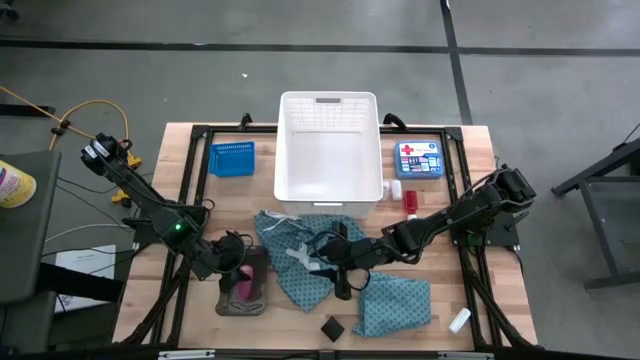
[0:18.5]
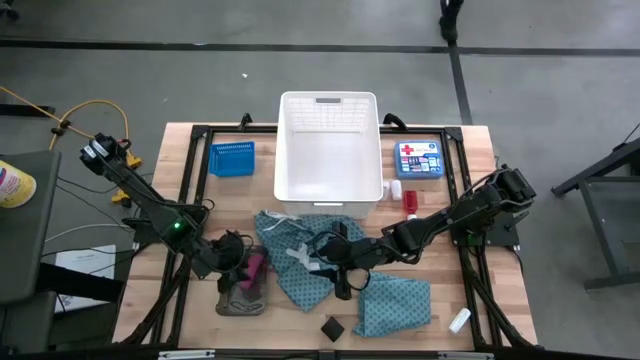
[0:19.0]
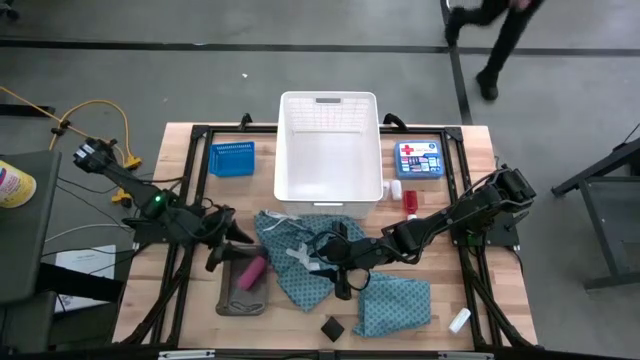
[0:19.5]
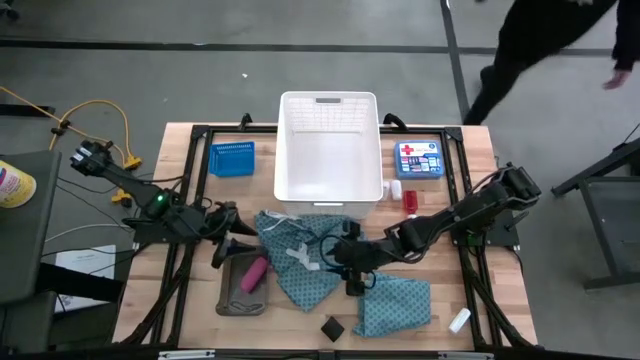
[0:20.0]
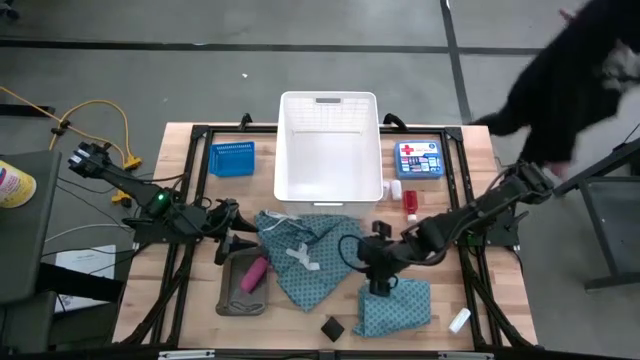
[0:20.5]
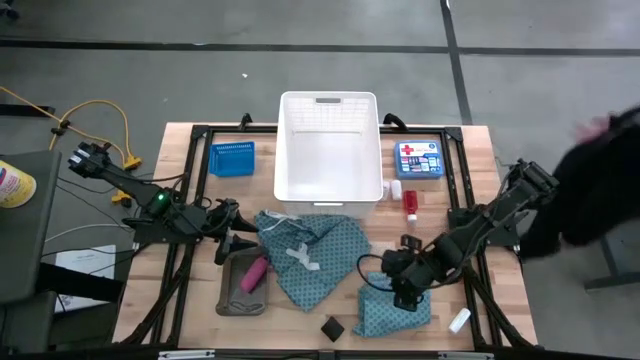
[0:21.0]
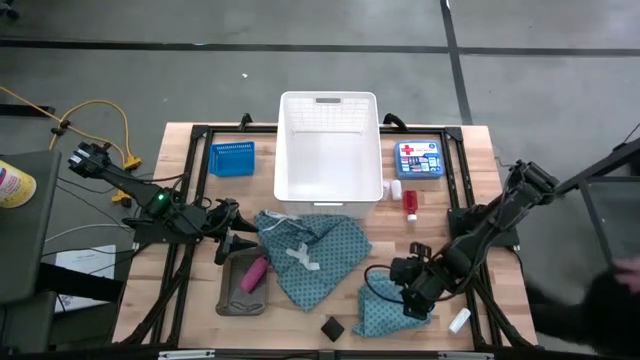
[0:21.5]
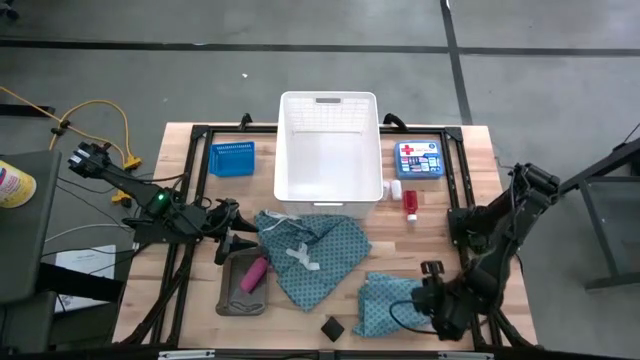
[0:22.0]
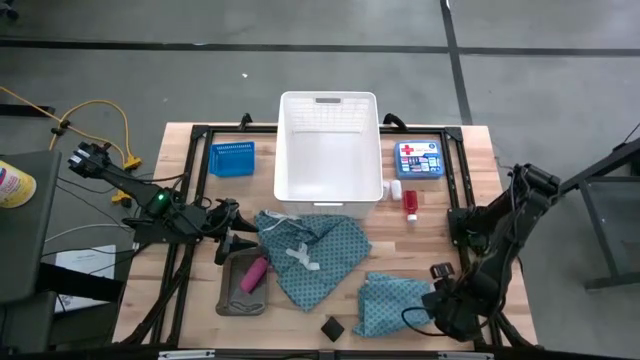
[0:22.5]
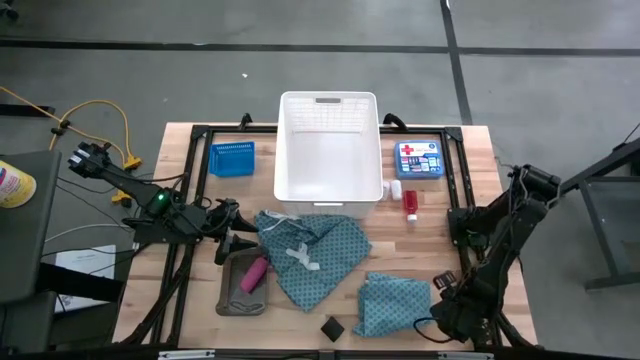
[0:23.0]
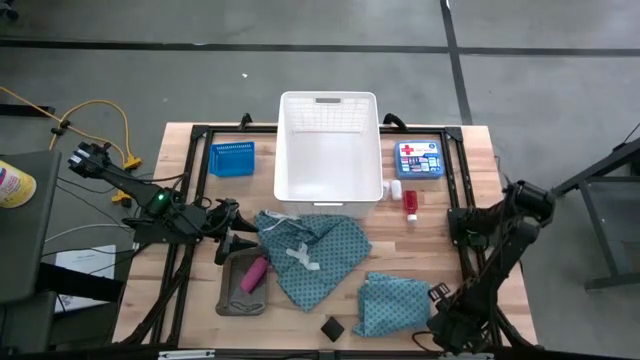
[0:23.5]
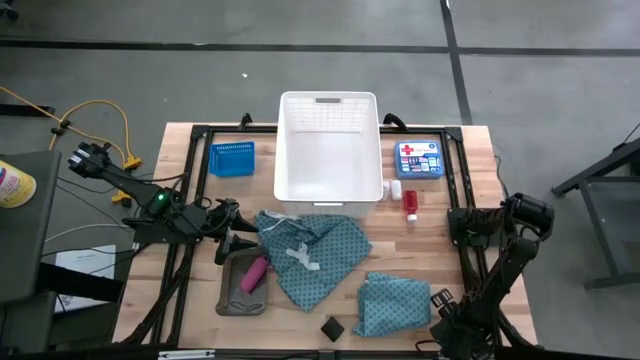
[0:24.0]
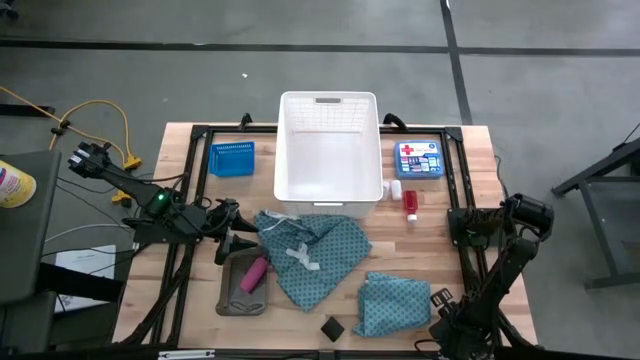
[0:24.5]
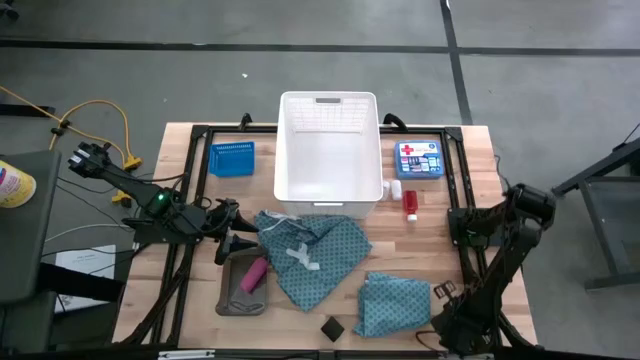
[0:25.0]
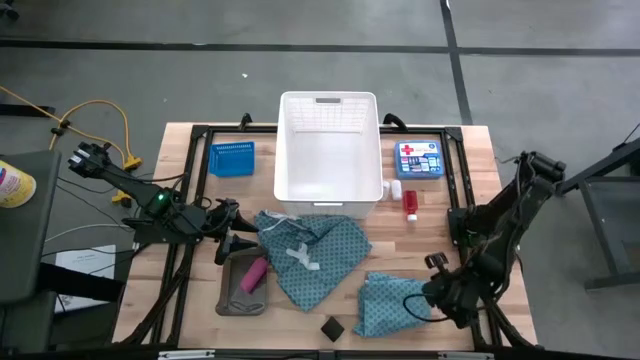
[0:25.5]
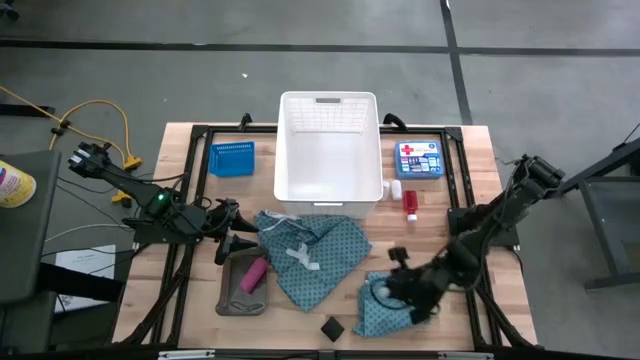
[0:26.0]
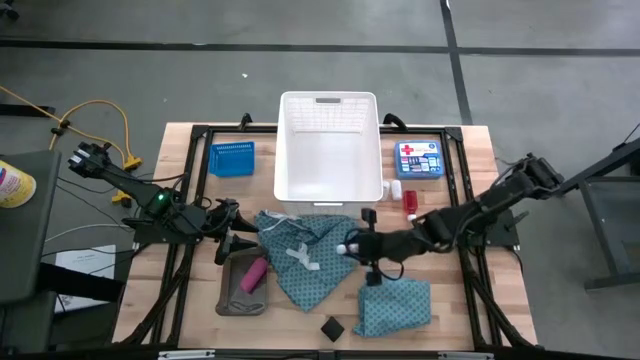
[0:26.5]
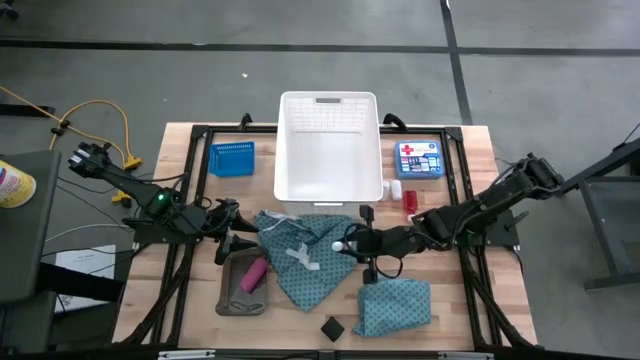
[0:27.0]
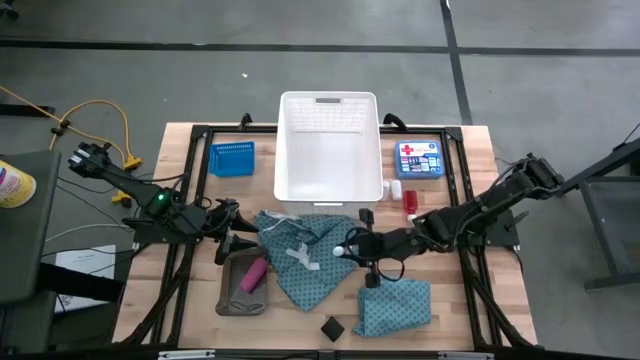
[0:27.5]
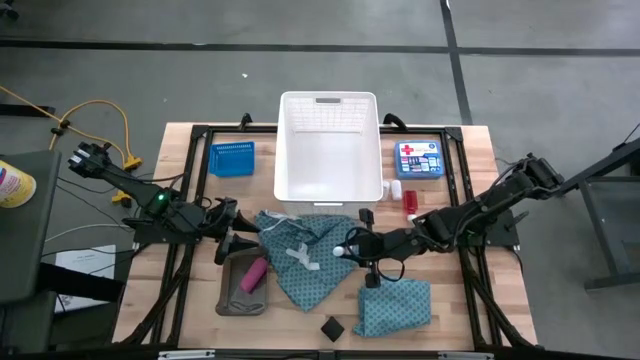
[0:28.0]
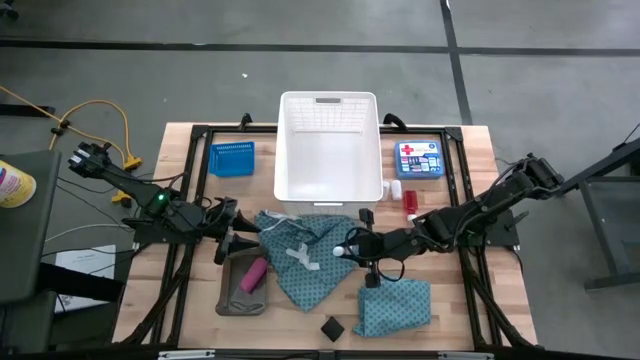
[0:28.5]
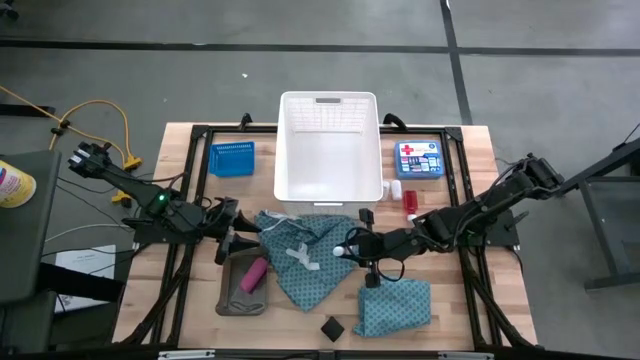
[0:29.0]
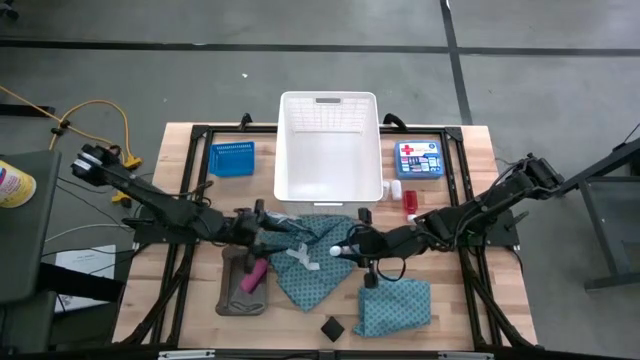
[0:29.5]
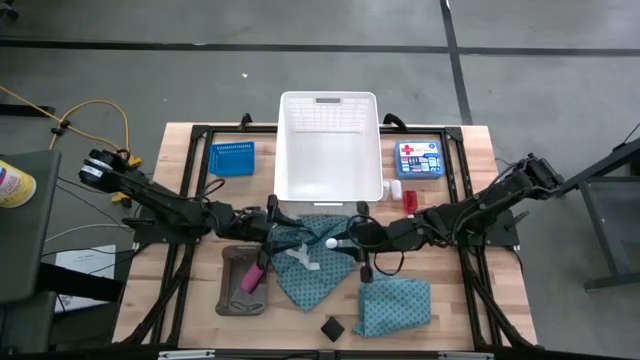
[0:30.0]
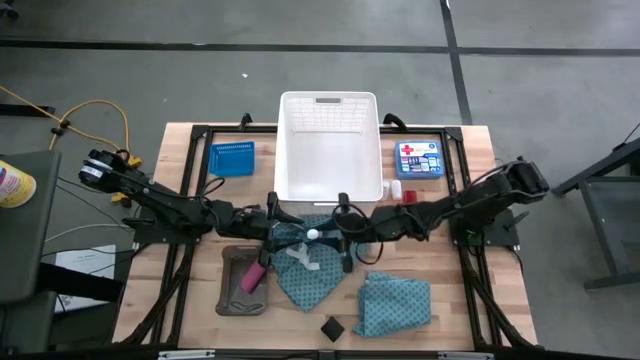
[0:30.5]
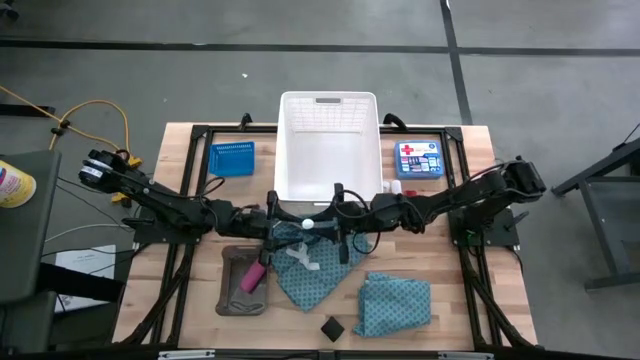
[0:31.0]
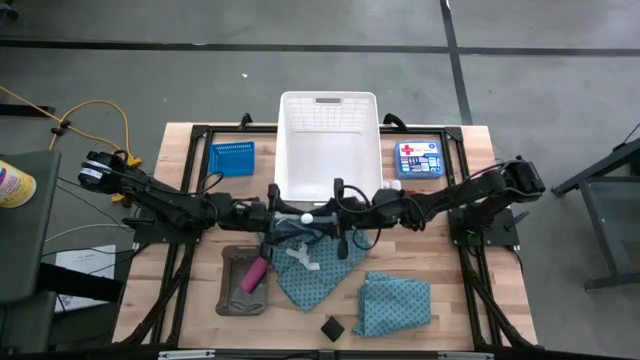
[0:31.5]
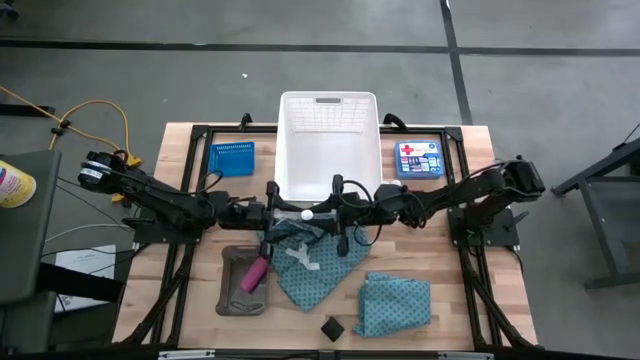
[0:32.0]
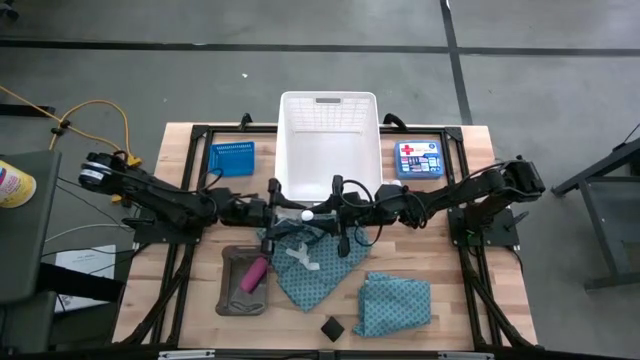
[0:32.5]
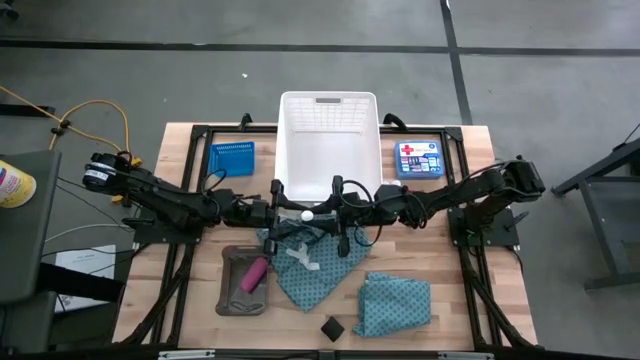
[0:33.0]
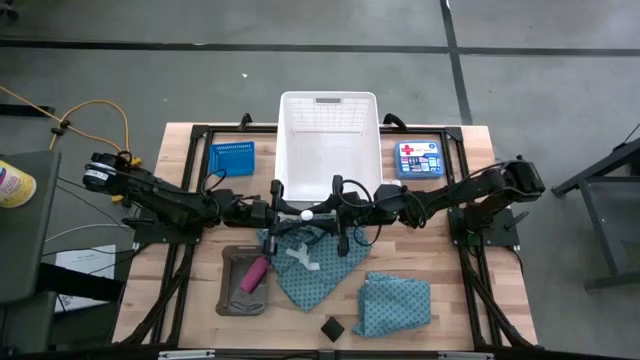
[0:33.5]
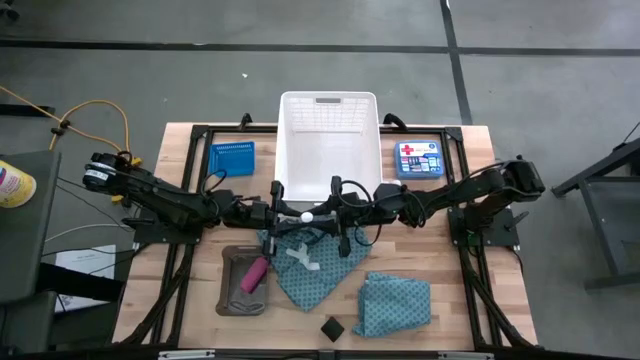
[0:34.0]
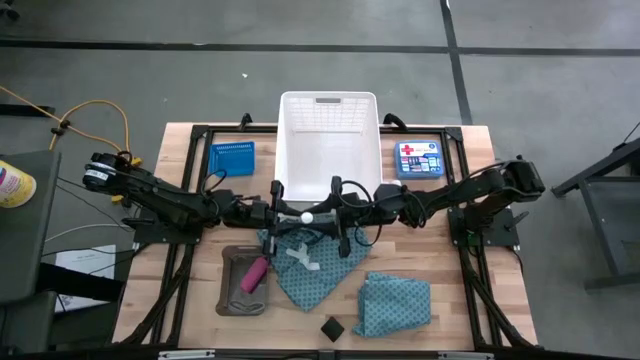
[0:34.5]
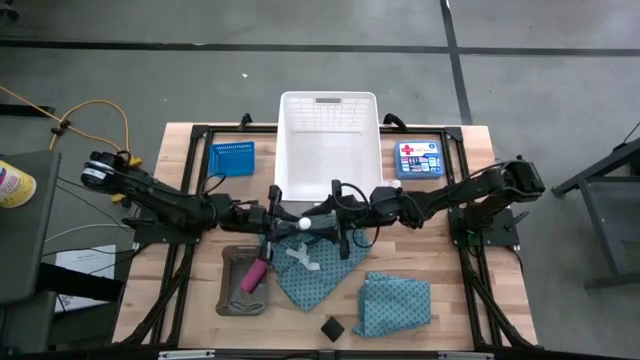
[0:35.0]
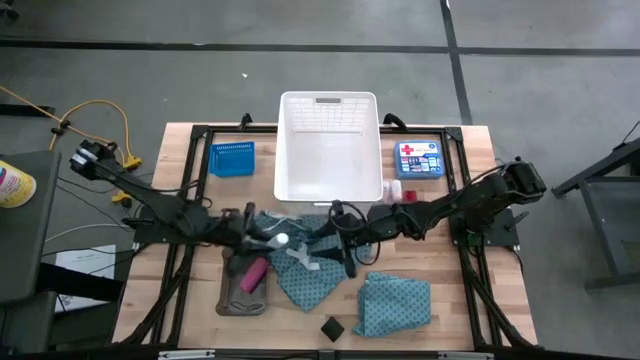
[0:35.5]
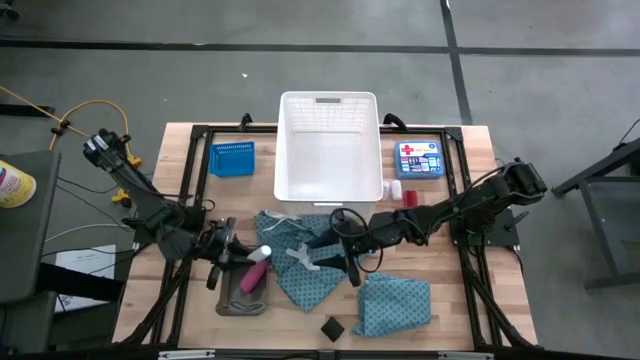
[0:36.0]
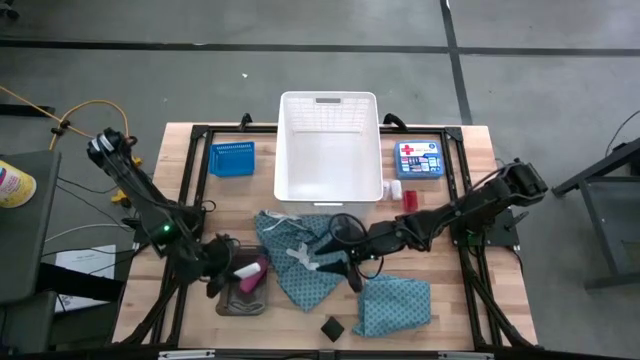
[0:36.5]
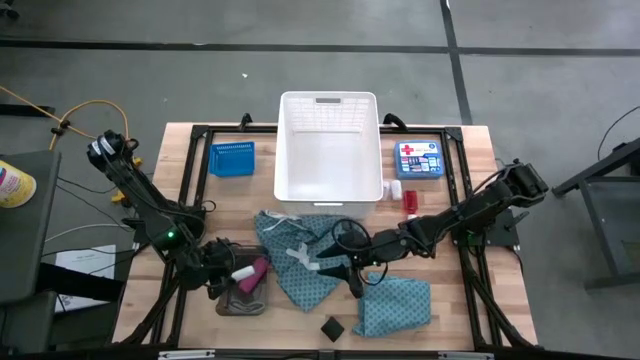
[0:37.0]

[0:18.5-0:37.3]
Task: Pick & place medical supplies in basket/bin
Put the white gauze into the black bin

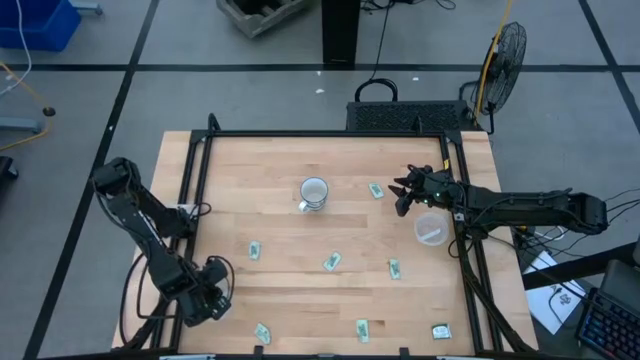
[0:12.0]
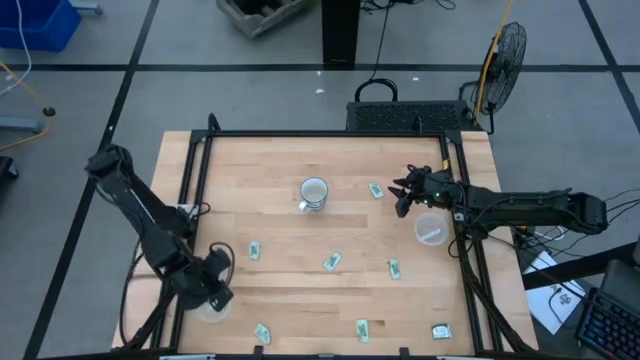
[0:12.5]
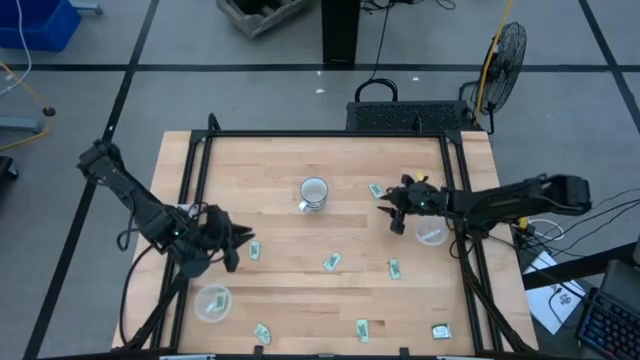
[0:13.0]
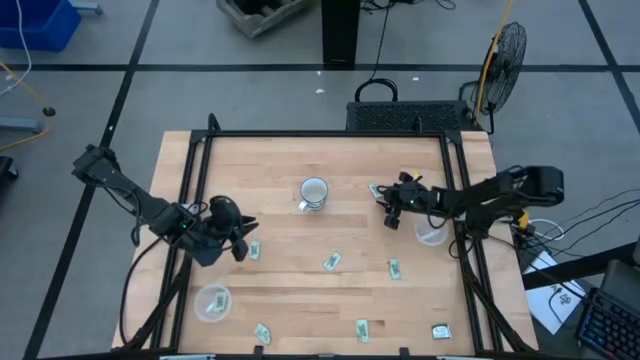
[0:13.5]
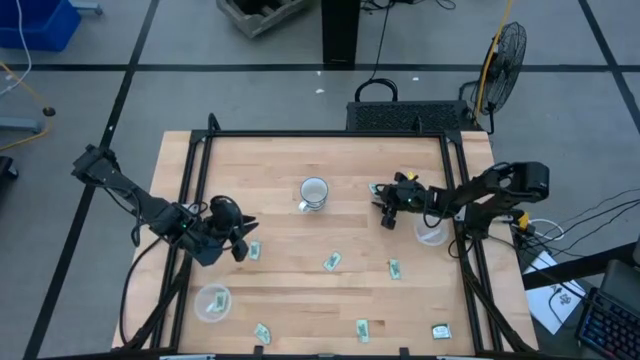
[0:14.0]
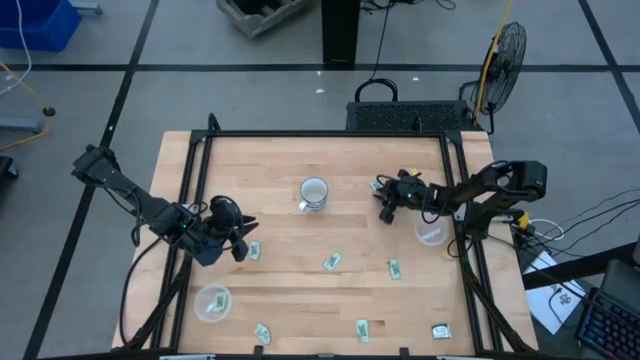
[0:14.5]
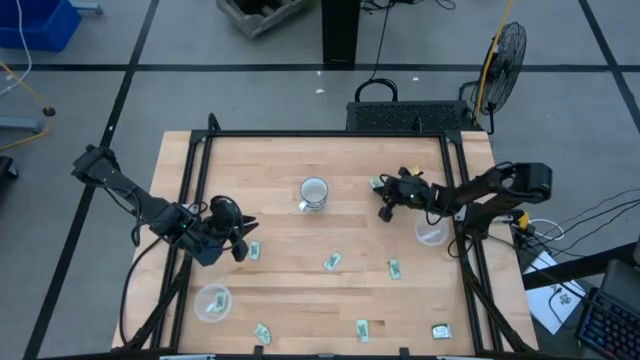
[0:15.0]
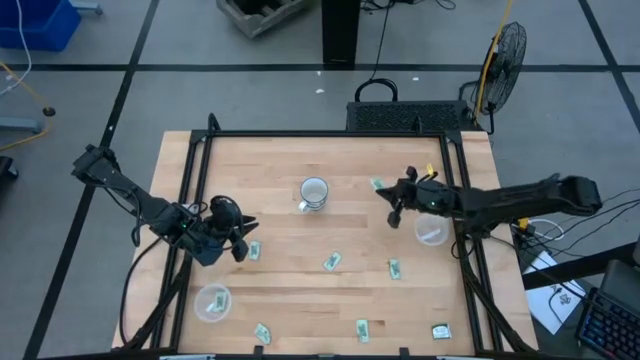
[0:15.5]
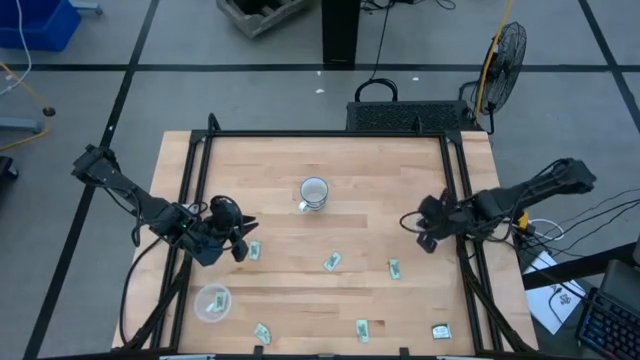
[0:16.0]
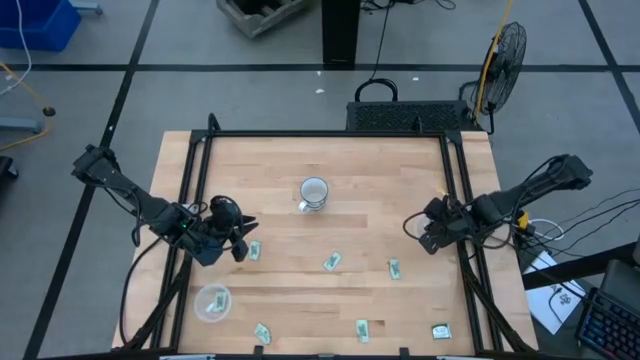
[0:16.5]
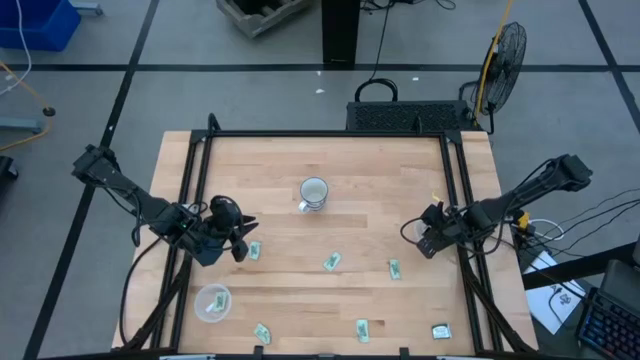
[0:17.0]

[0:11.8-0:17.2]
Task: Pick and place Stevia / Truvia into bins
Put the green stevia packet into the right transparent container
